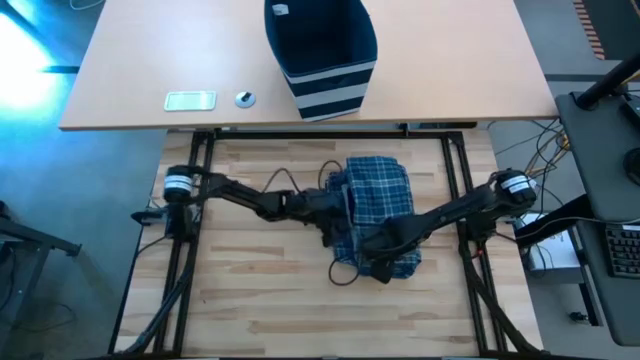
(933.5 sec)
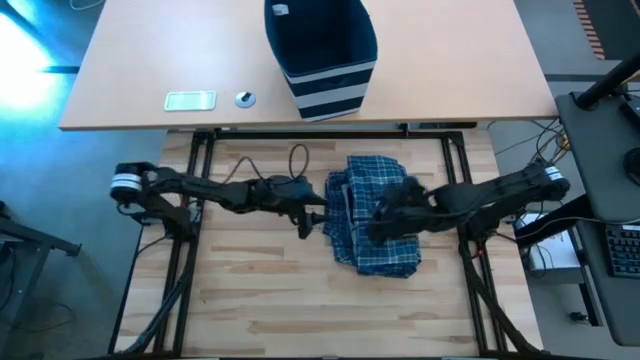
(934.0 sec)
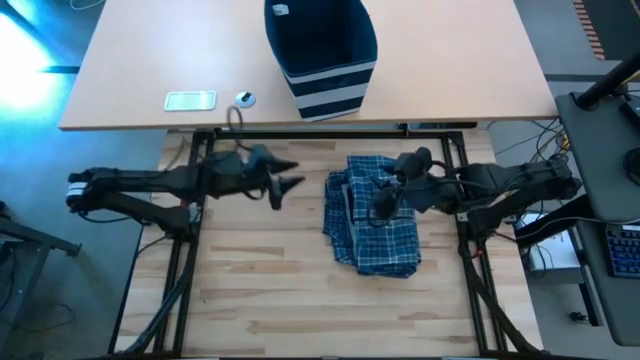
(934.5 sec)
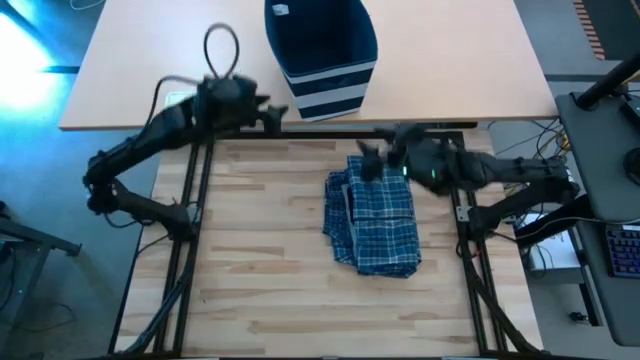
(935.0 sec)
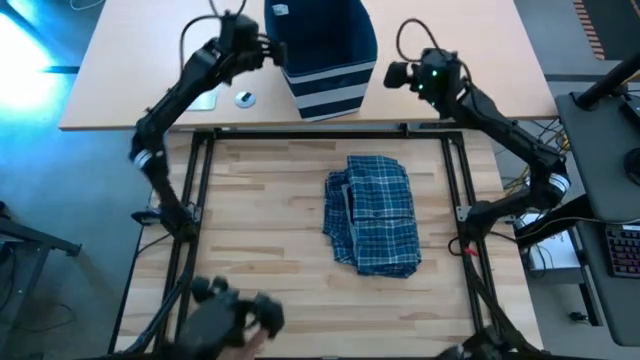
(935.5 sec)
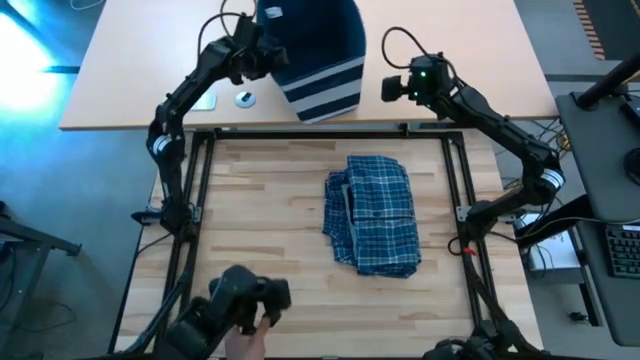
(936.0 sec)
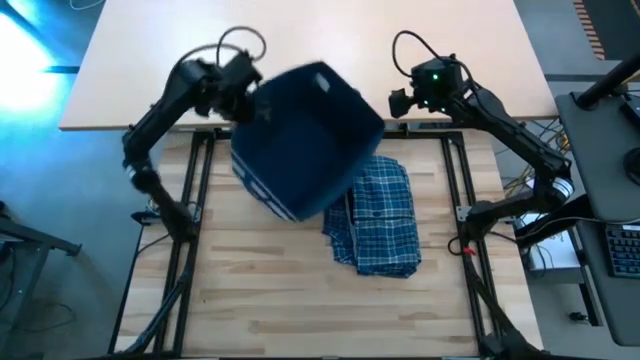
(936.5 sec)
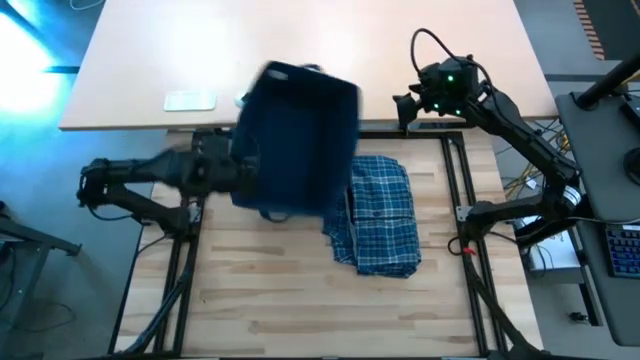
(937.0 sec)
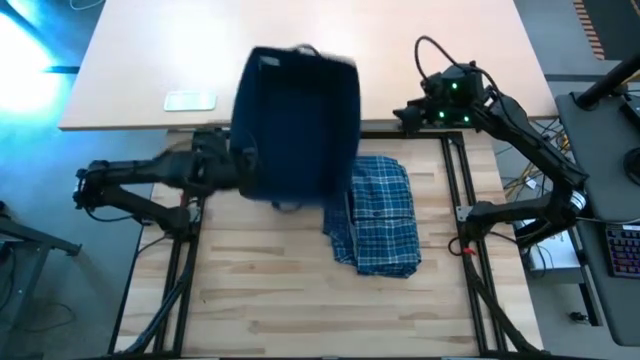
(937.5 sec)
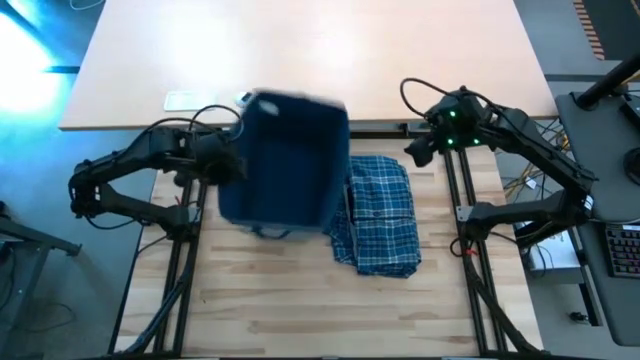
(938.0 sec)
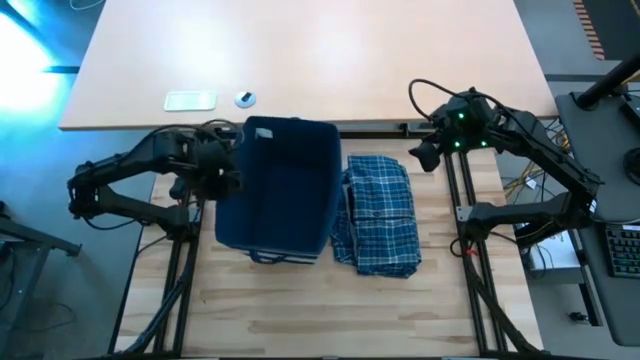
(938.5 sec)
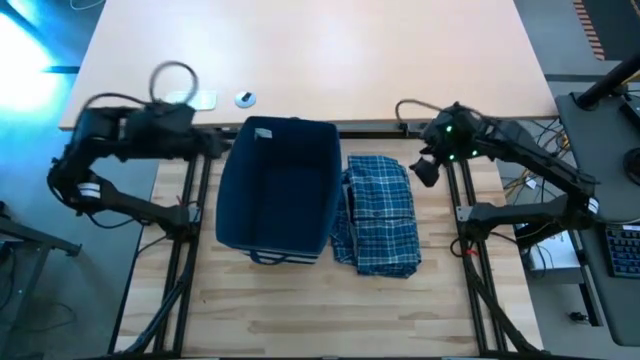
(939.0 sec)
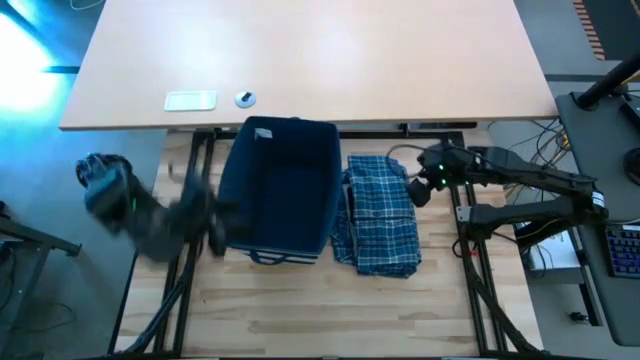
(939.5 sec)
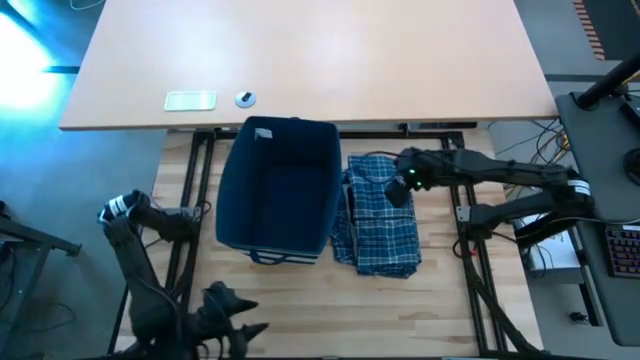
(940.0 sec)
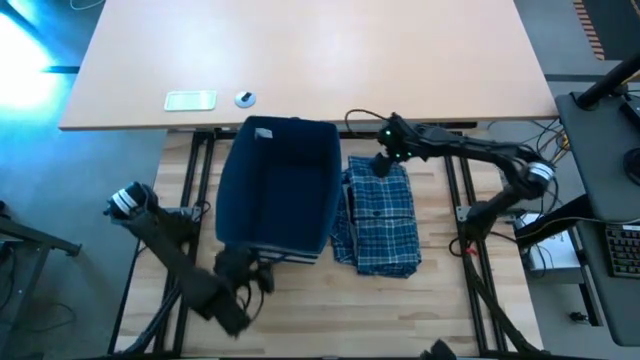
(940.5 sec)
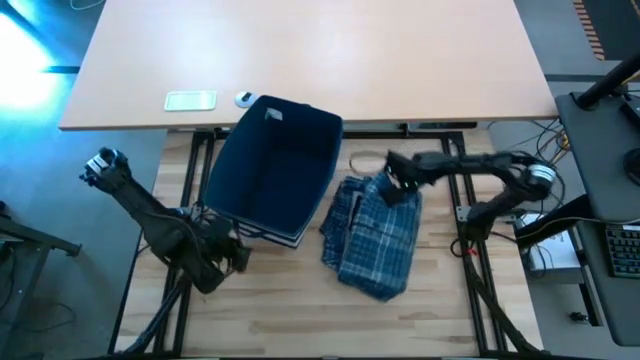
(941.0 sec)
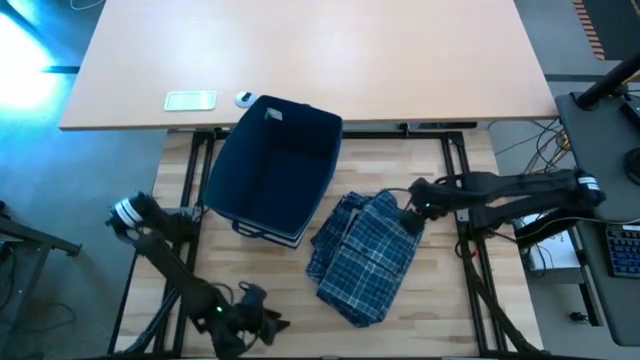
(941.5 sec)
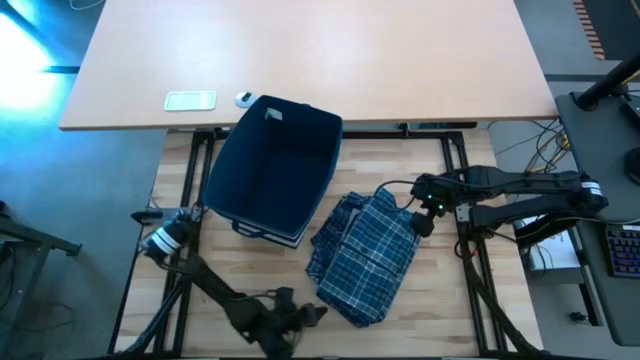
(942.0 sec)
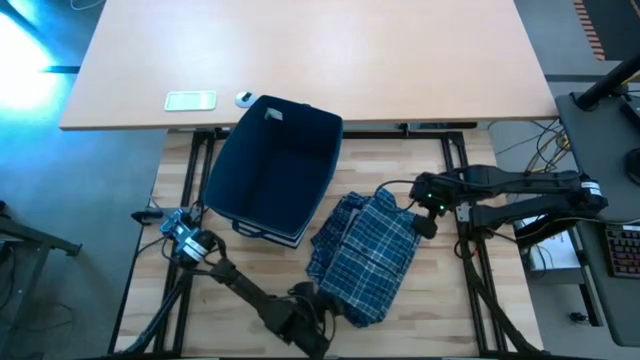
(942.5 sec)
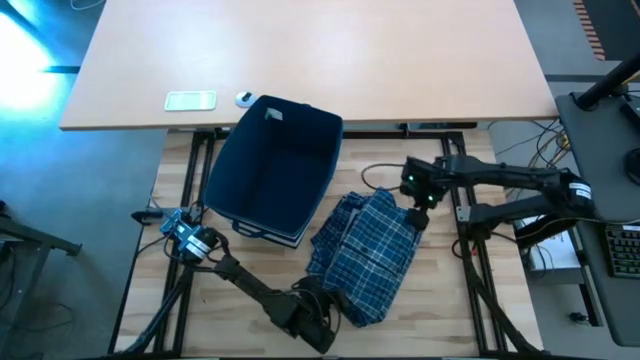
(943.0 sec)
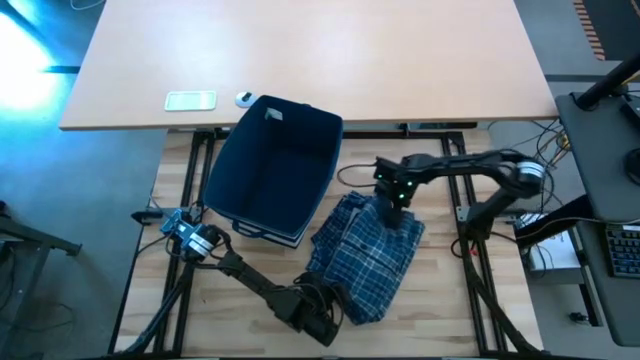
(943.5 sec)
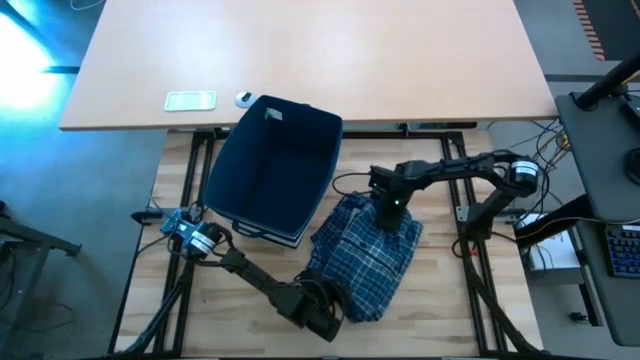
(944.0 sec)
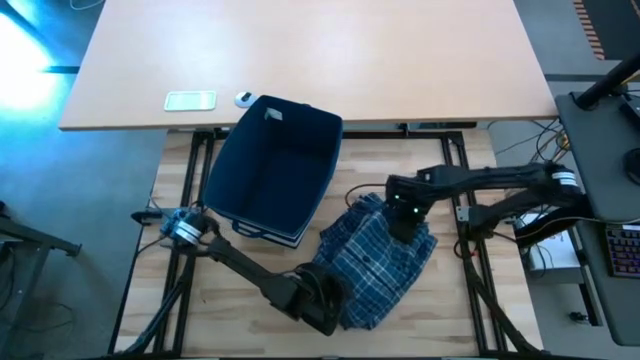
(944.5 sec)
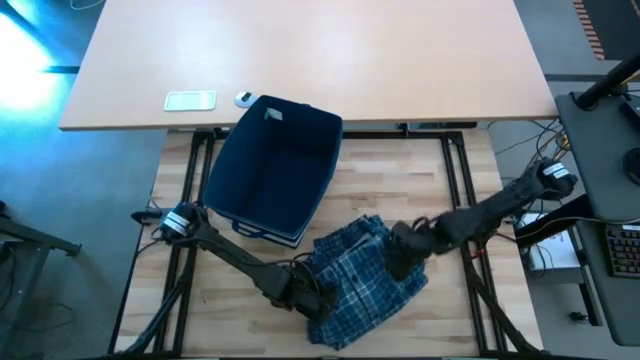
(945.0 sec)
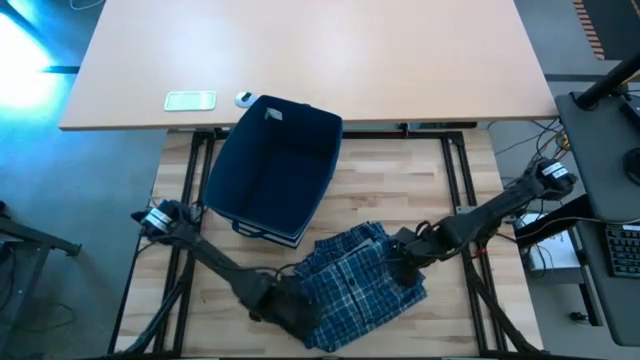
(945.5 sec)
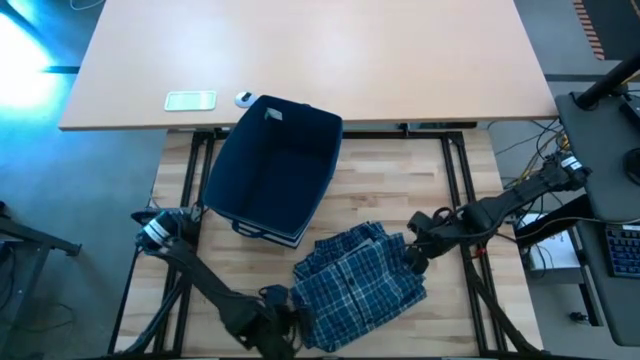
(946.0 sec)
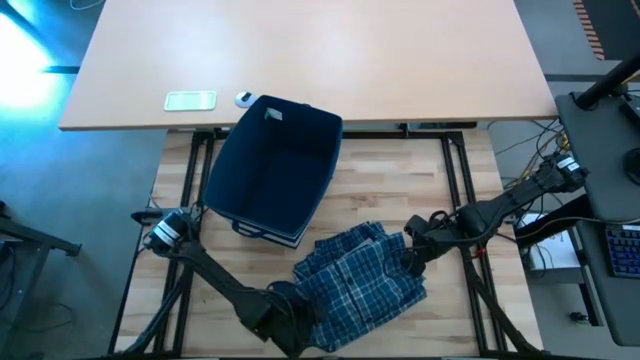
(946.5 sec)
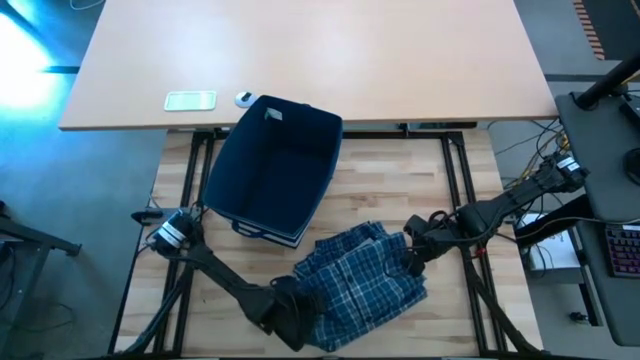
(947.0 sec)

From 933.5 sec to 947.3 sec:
Task: Fold Laundry from Bin
Put the stacked clothes into the laundry bin

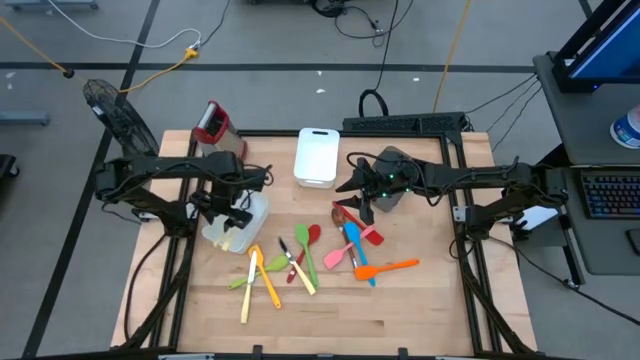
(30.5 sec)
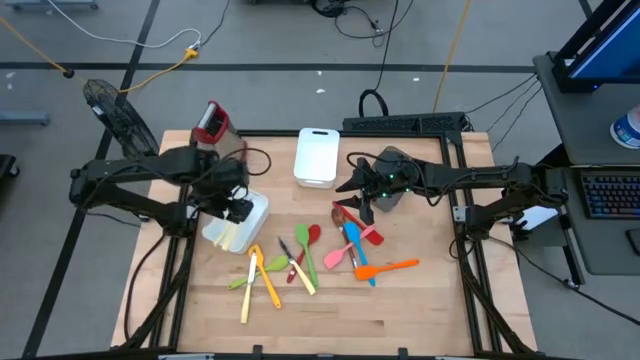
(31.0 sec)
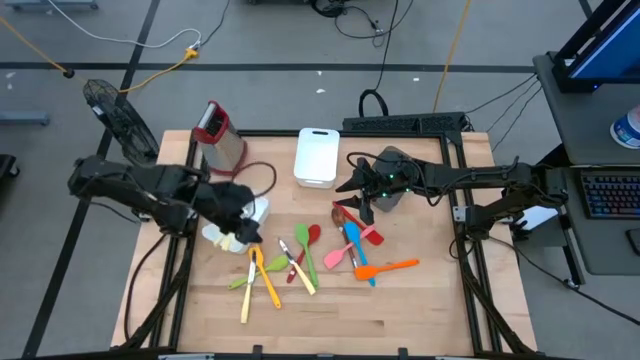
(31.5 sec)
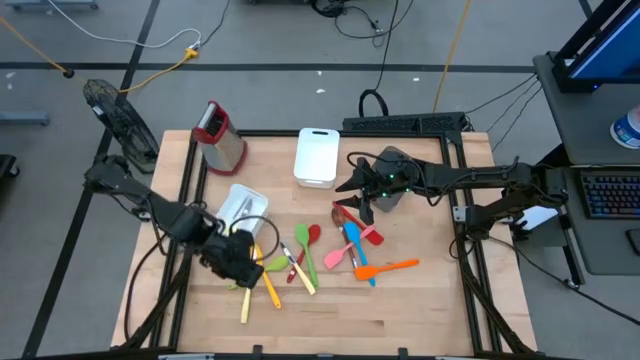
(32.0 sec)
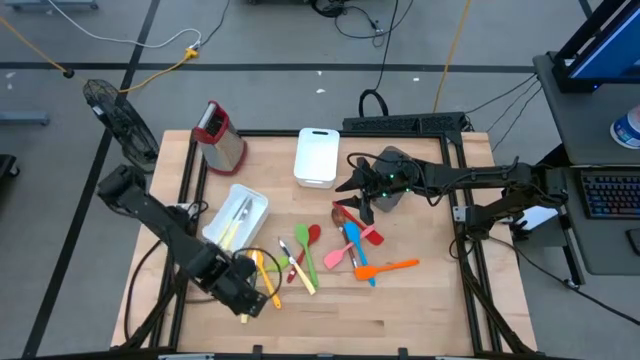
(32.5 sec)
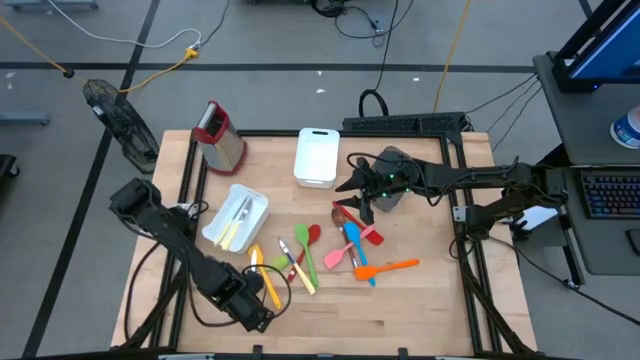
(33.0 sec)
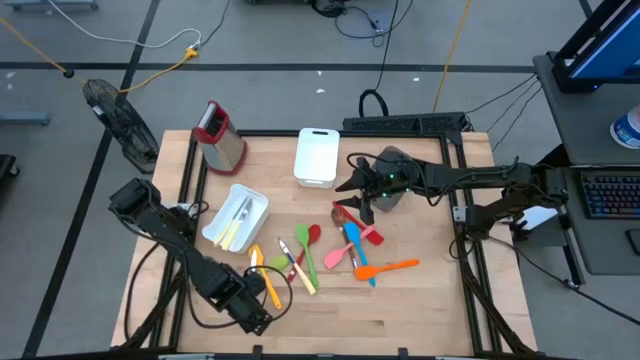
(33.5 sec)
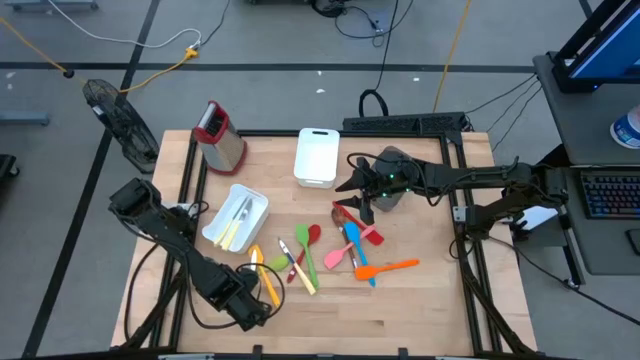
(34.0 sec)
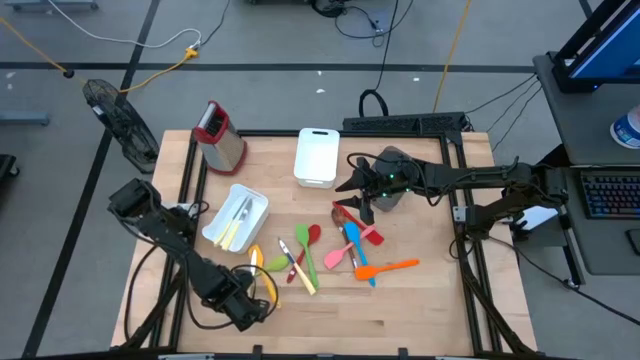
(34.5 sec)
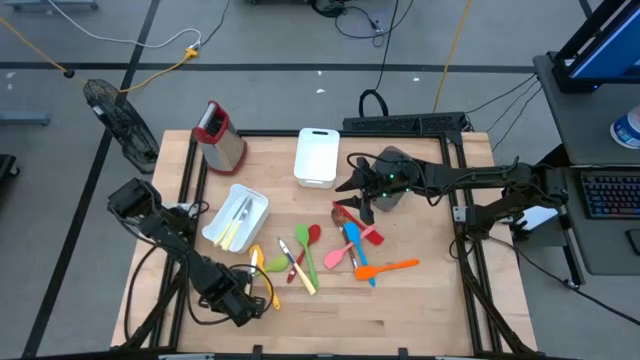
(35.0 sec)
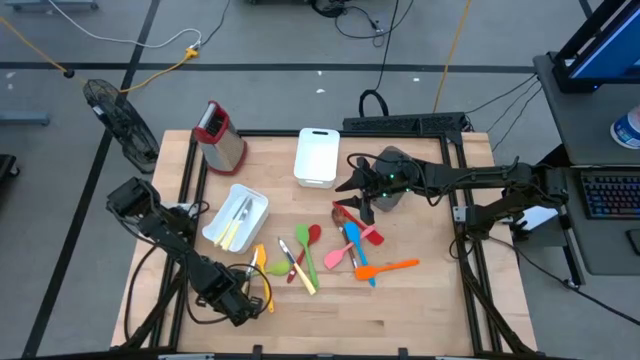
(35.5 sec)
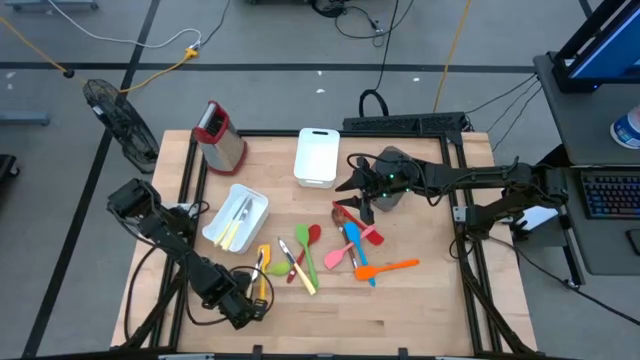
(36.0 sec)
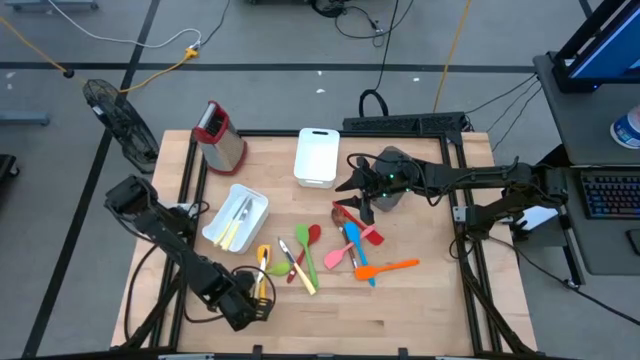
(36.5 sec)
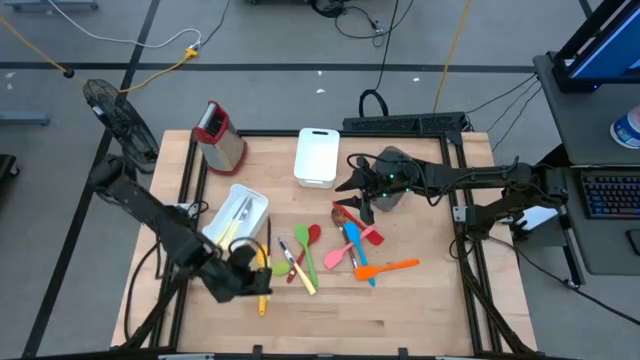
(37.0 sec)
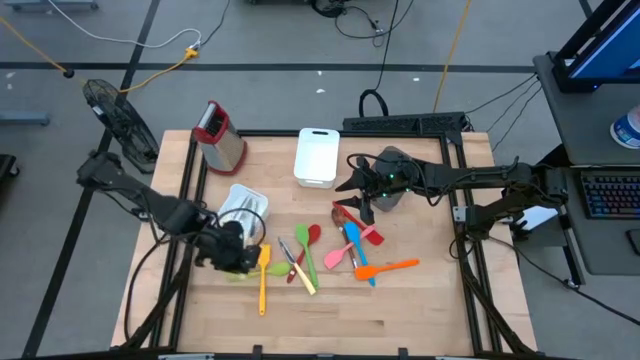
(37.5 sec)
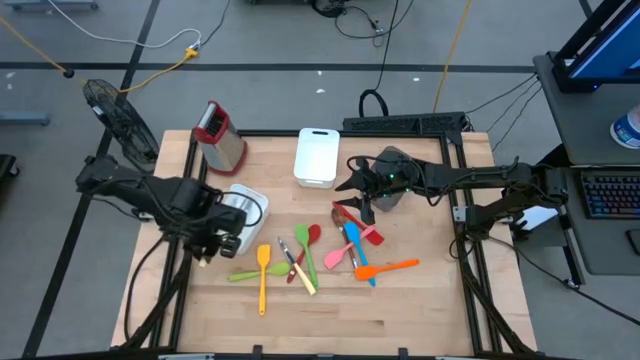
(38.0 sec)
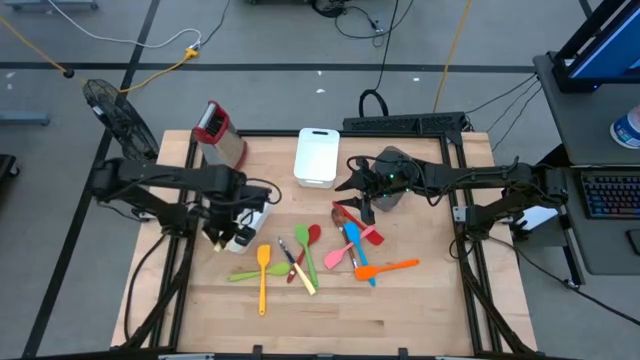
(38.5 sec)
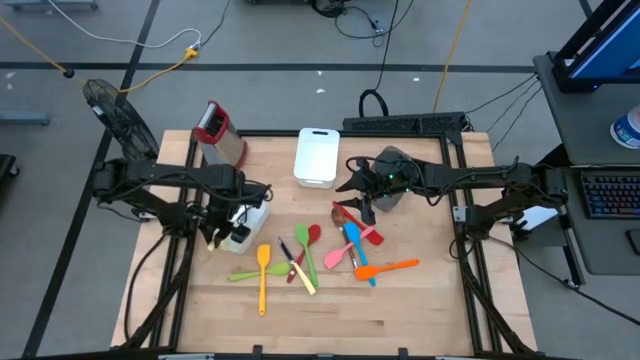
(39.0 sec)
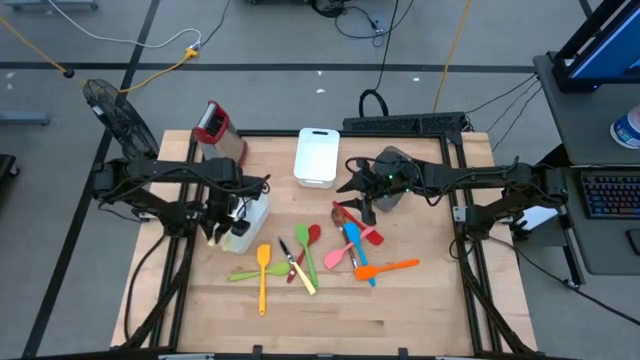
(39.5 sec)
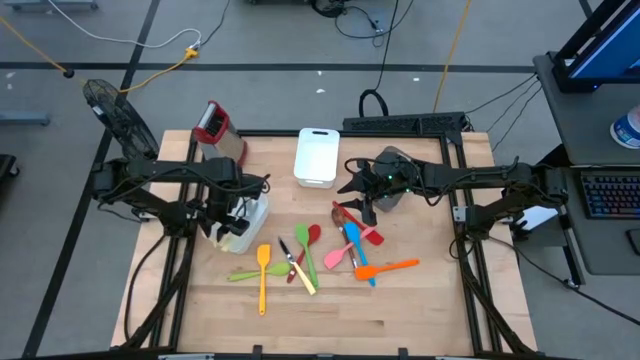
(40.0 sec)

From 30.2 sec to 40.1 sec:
Task: Pick & Place Kitchen Items
Put the yellow table knife into the bottom white bin
